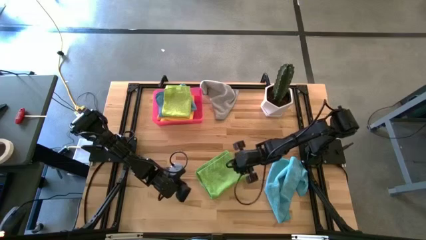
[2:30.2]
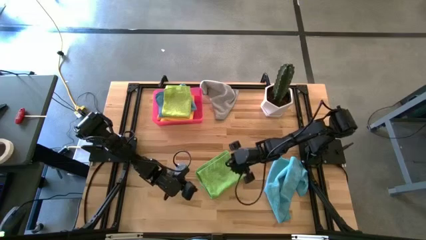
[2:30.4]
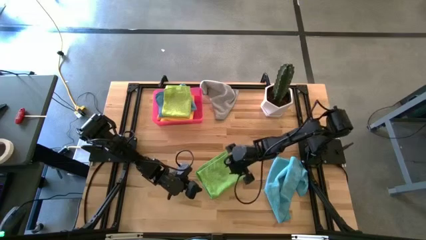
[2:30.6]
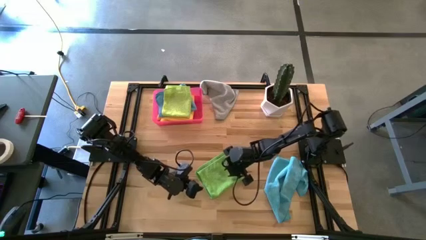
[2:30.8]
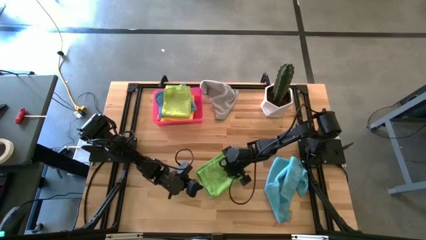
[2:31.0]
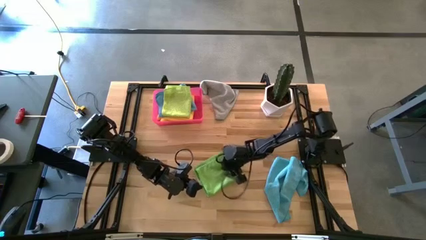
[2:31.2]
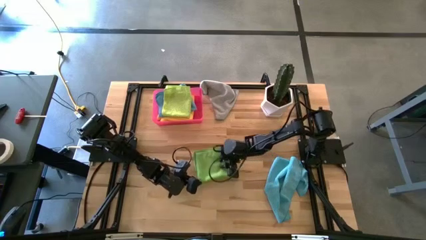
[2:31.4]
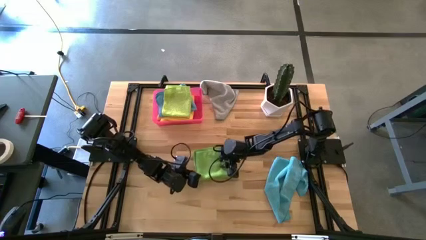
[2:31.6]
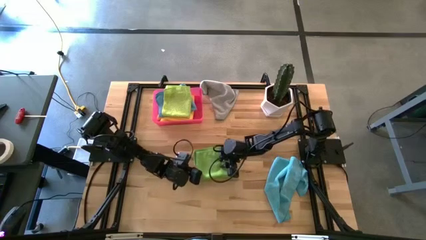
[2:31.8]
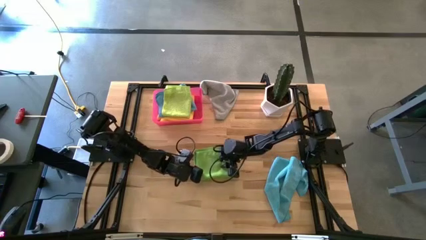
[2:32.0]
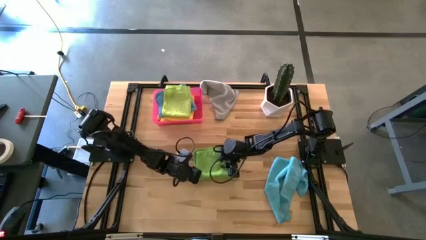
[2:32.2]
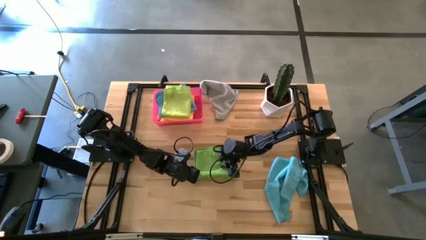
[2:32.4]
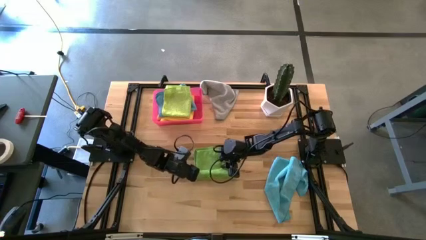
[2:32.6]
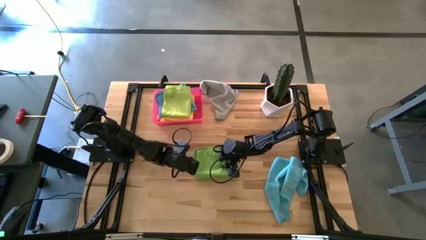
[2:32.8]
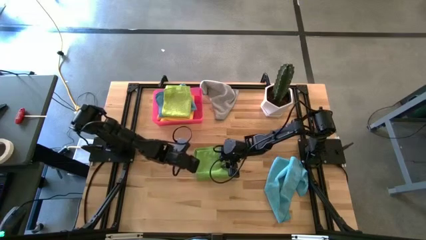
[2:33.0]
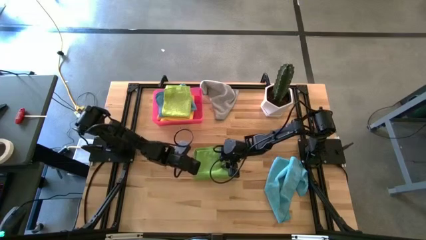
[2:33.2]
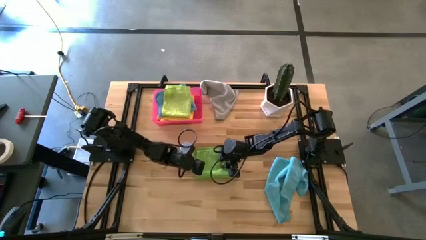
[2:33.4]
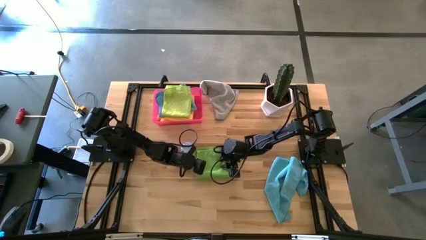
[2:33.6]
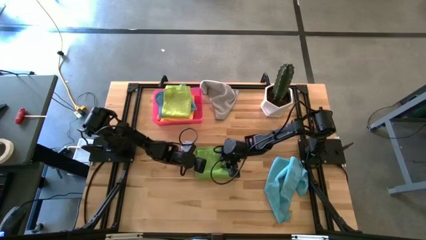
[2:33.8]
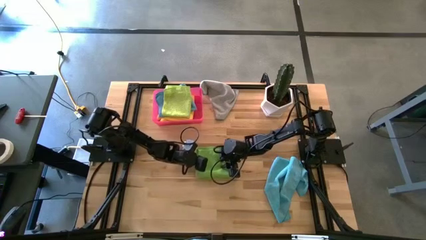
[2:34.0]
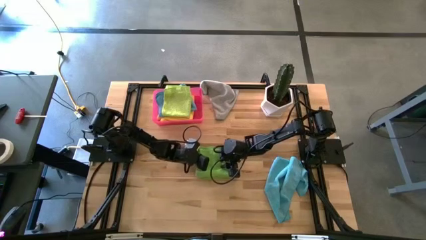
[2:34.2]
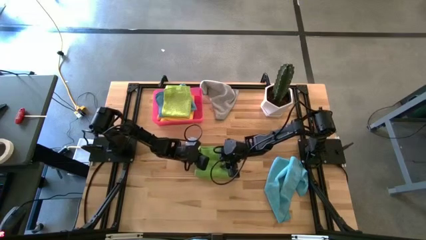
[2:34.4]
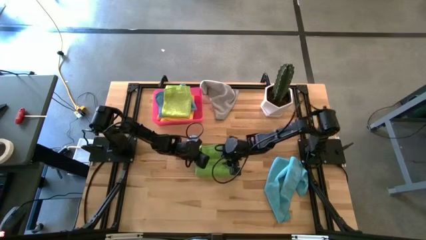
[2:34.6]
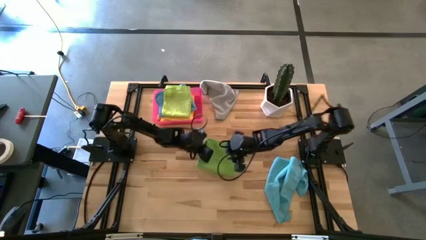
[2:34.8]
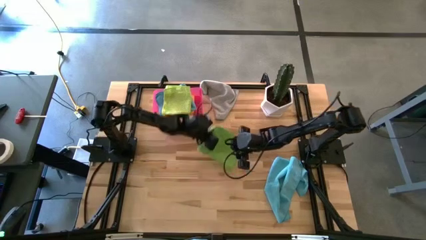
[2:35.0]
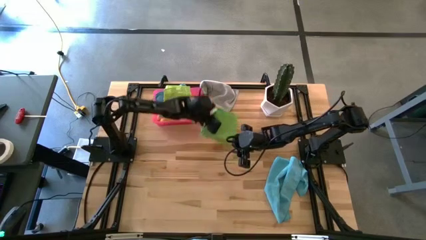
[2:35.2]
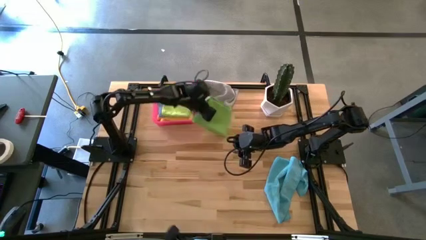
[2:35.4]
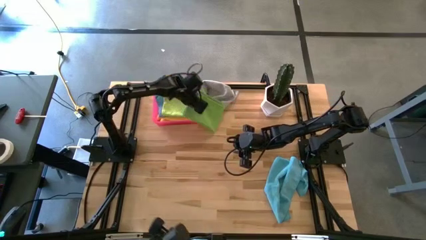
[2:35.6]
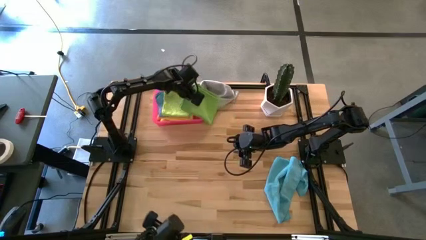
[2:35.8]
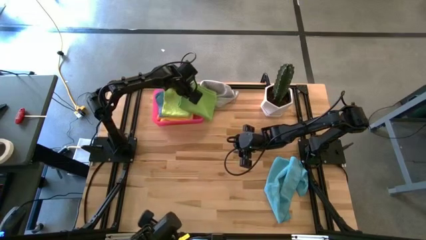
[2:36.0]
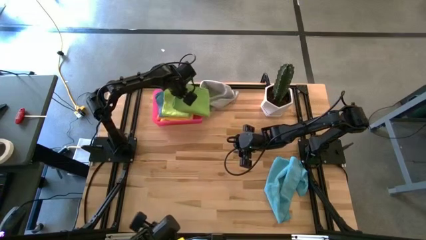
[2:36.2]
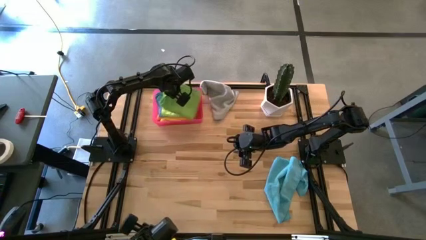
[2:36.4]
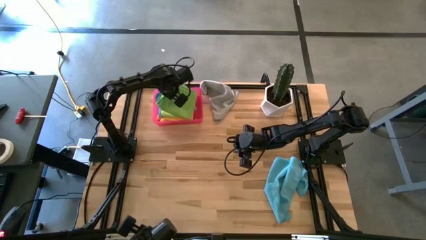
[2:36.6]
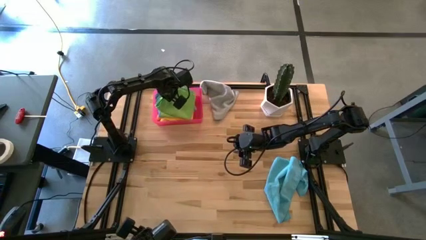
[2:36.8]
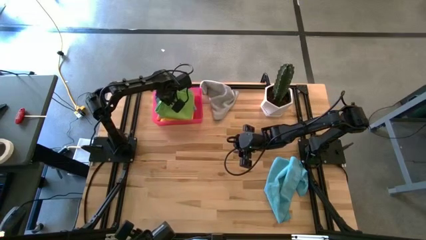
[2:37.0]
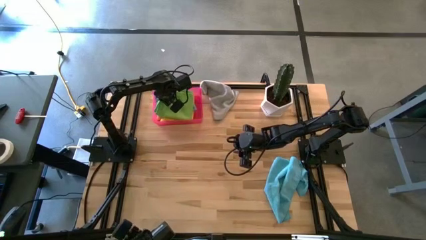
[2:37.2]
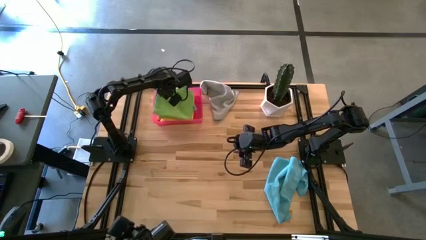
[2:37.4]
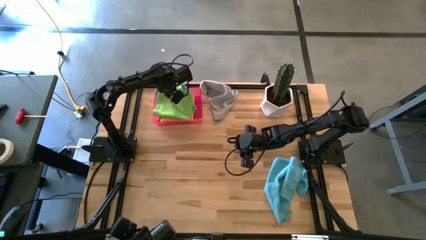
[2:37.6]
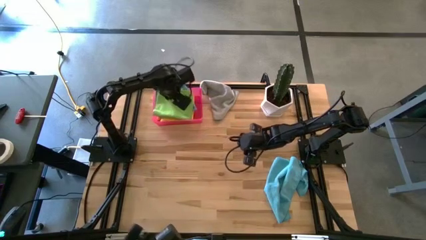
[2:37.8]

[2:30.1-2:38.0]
Task: Fold microfiber towels
Put the green towel into the bin

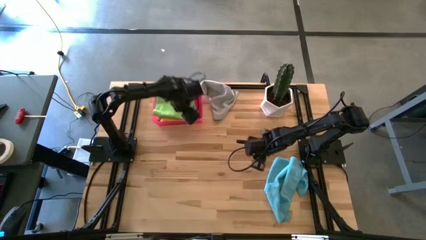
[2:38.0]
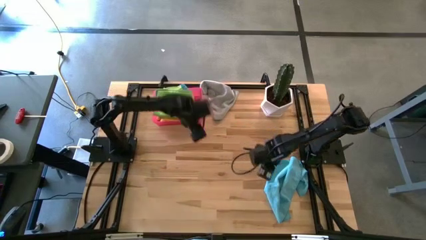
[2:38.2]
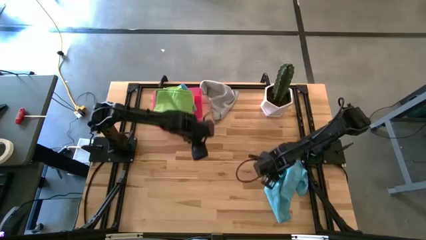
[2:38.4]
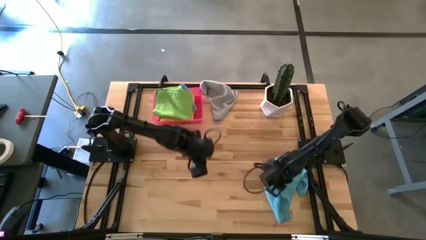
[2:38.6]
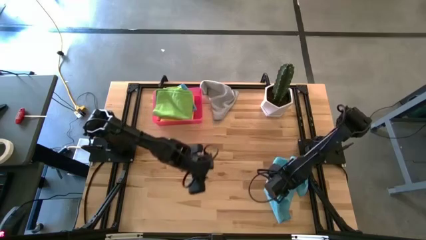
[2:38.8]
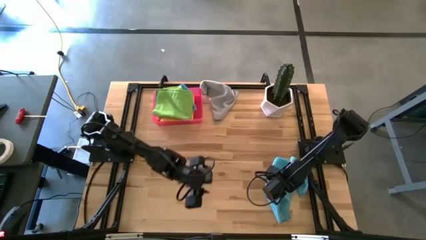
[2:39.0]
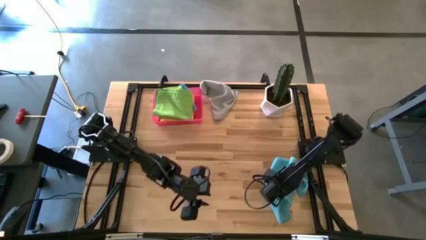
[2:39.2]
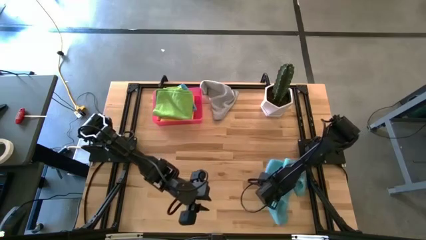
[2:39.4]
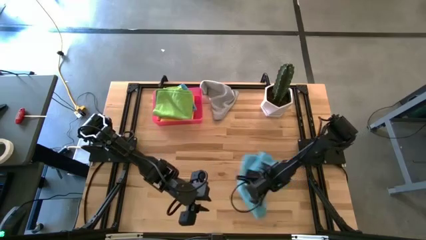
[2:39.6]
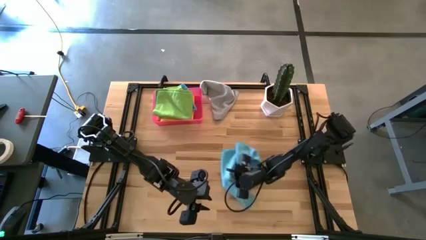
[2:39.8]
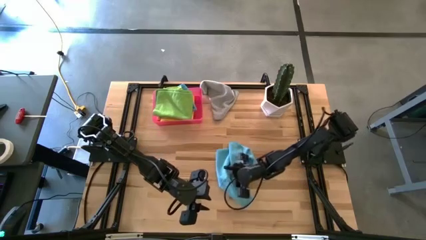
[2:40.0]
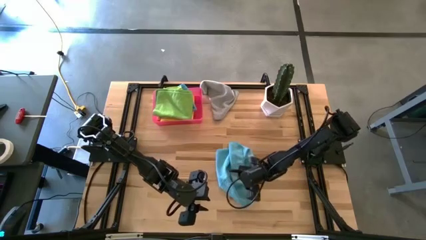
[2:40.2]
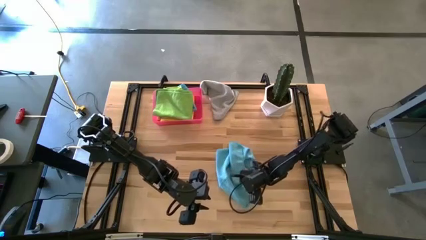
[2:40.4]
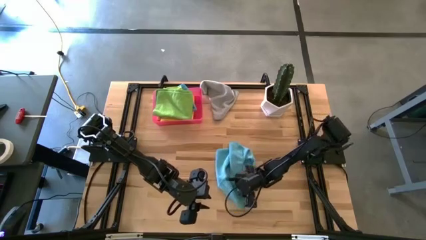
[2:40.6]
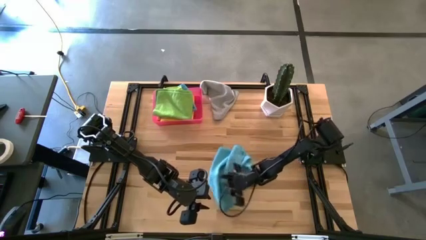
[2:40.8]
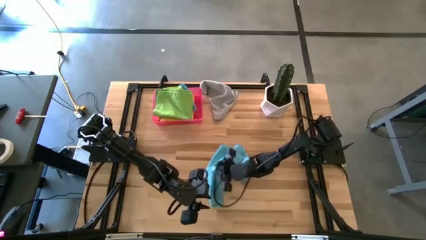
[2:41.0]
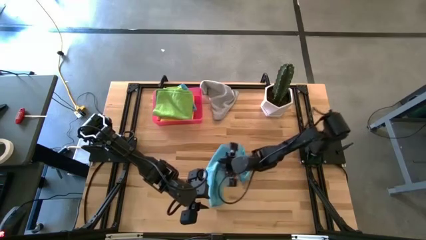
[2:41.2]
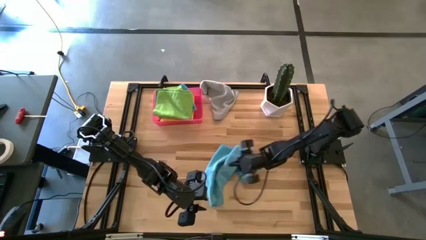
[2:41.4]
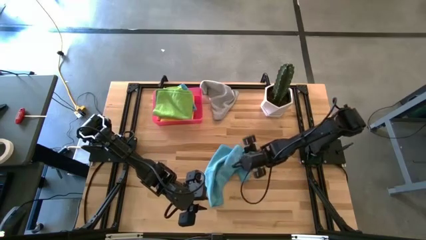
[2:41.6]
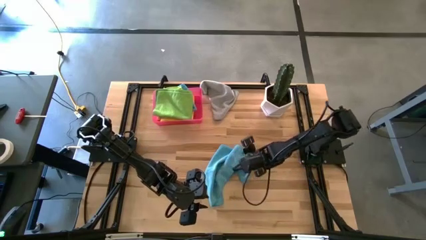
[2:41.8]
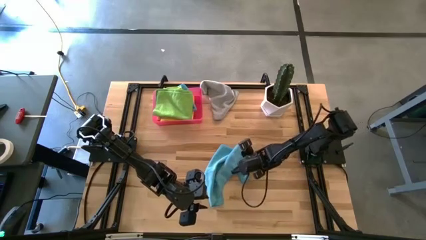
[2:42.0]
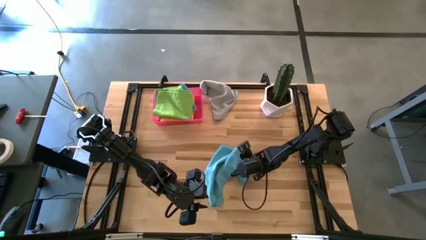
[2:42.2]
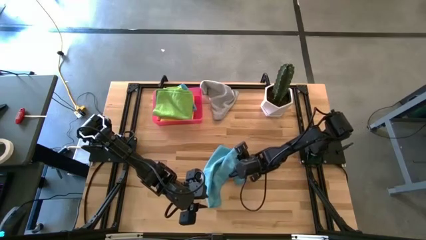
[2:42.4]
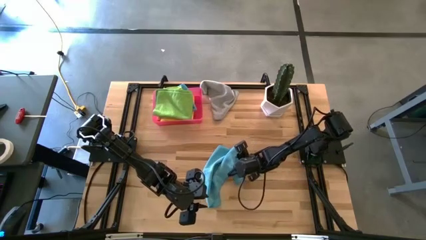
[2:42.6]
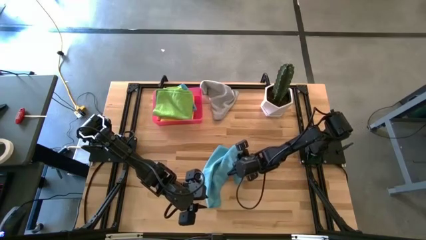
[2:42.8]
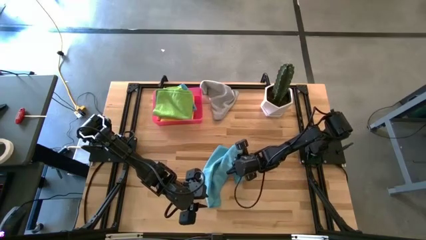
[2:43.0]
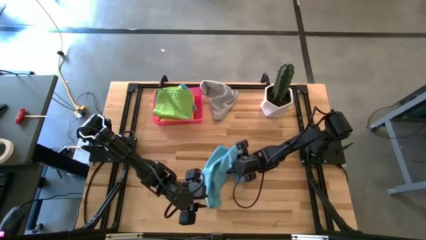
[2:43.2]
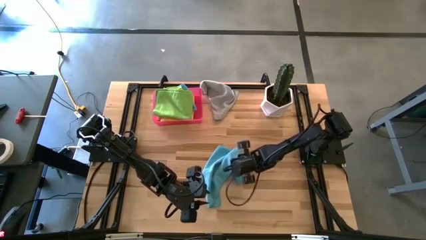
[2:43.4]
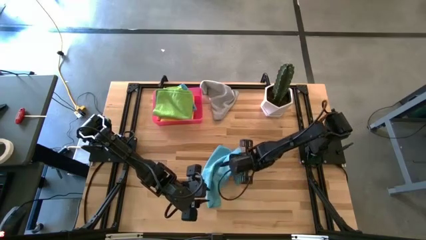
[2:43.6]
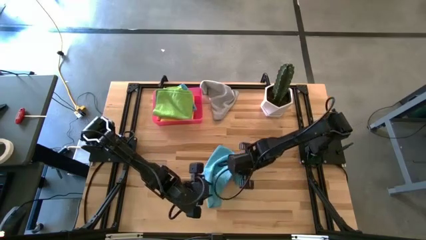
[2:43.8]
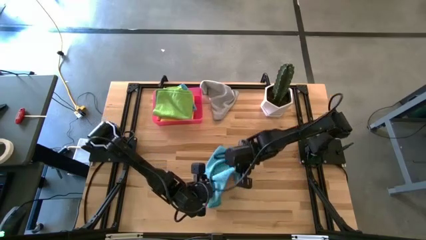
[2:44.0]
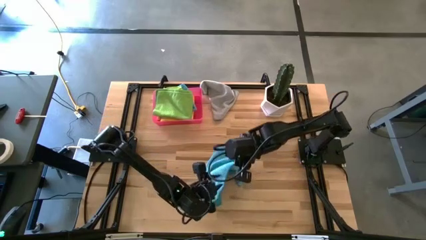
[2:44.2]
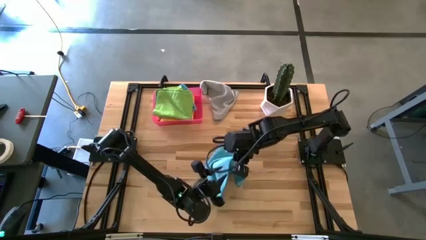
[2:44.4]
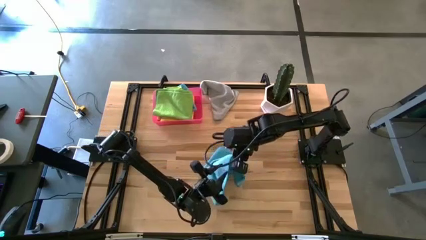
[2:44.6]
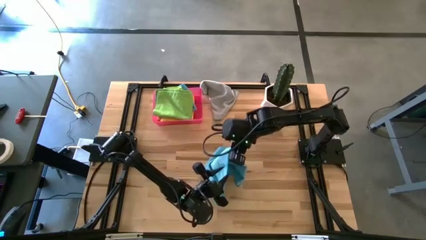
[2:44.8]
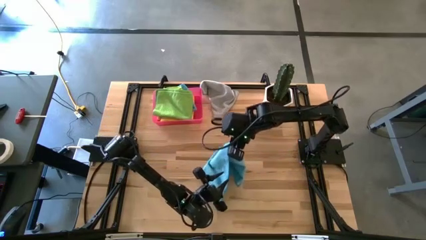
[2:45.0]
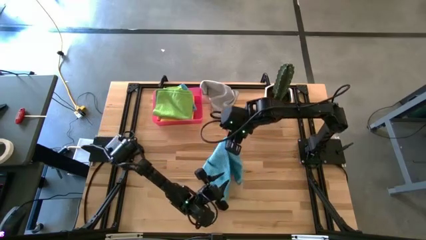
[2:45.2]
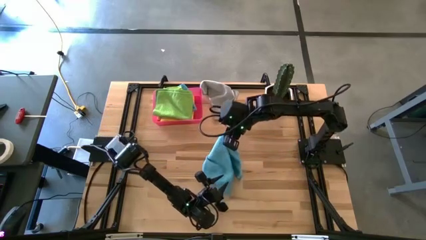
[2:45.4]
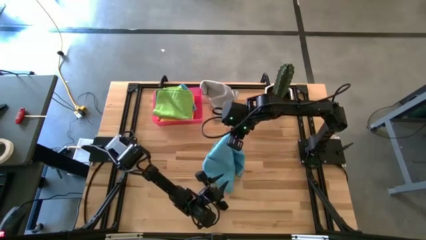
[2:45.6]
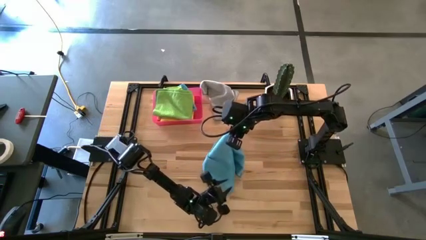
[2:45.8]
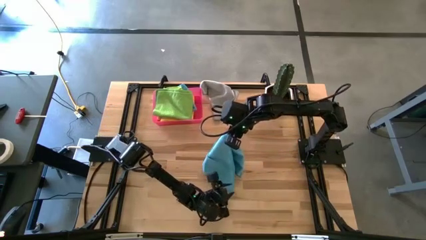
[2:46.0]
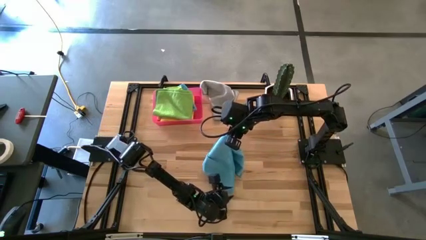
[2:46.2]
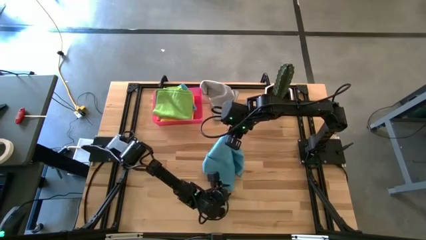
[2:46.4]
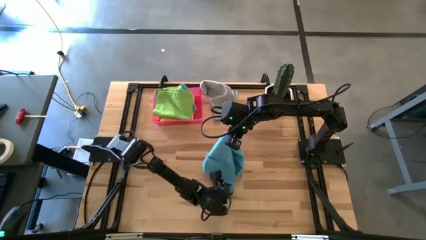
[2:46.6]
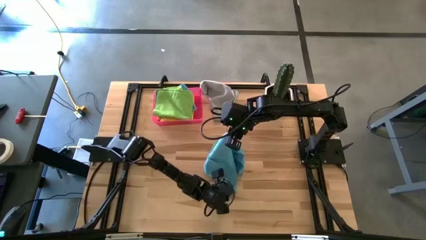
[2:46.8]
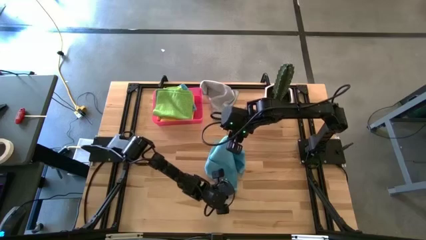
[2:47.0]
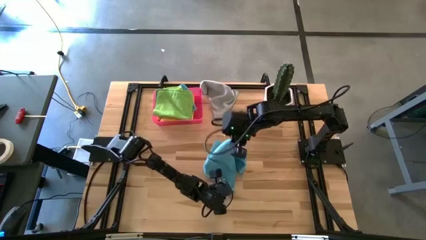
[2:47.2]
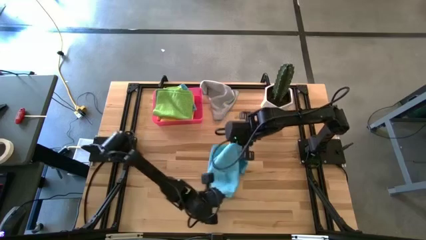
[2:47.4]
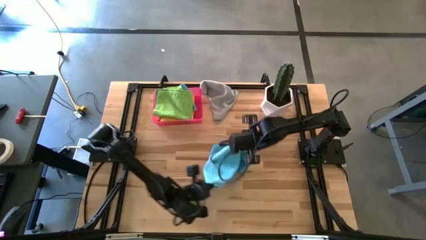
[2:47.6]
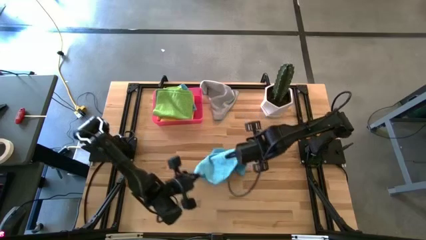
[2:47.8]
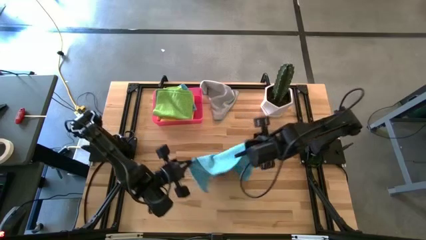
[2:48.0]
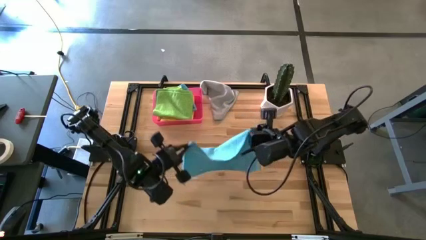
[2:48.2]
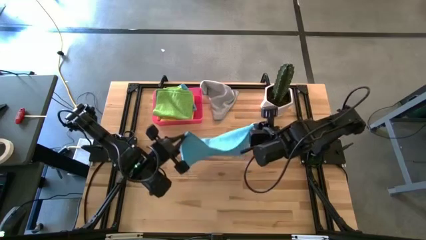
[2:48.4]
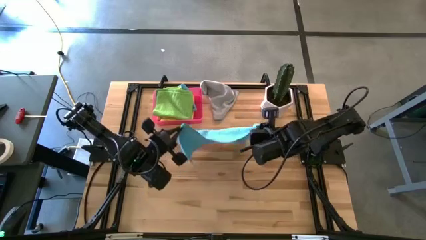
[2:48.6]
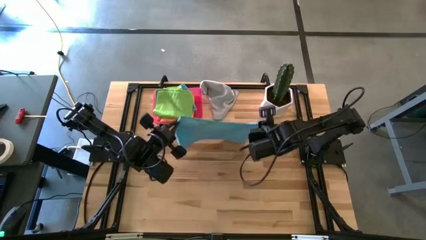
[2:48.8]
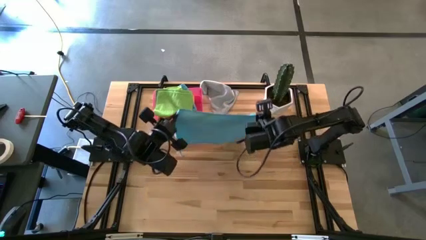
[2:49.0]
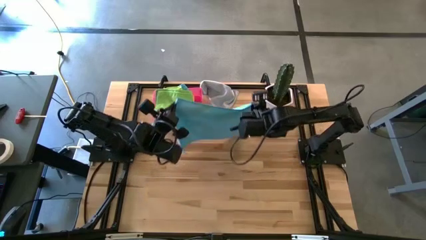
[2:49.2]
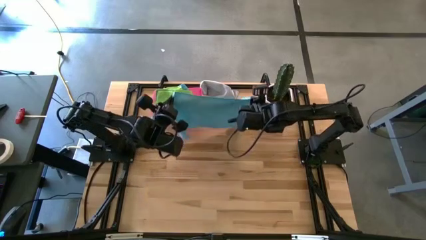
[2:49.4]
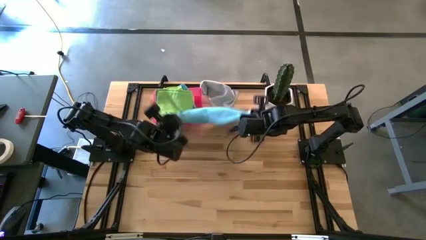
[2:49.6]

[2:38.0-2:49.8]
Fold the blue towel on the table
